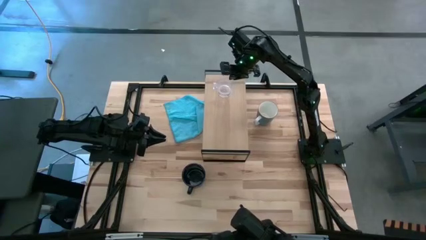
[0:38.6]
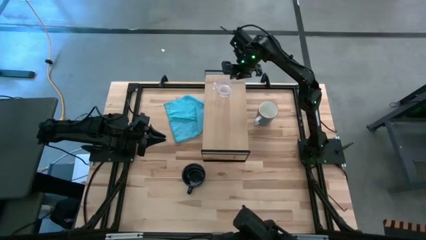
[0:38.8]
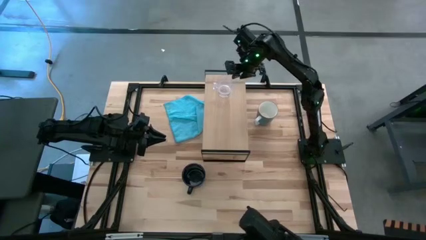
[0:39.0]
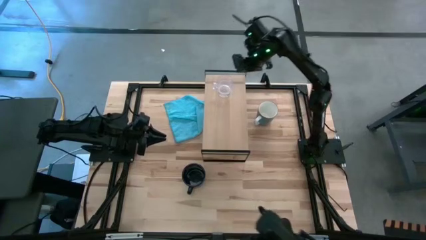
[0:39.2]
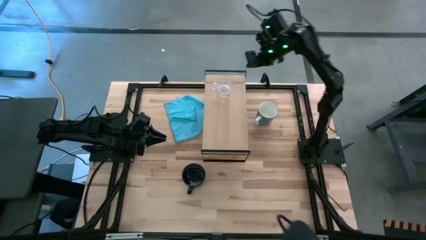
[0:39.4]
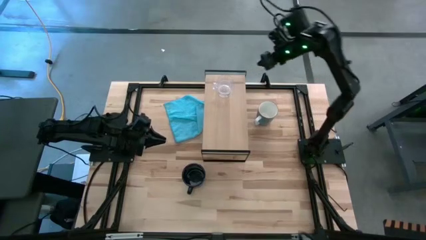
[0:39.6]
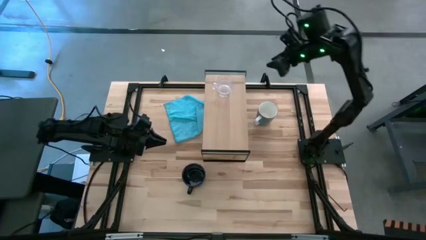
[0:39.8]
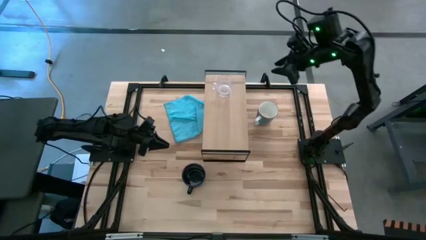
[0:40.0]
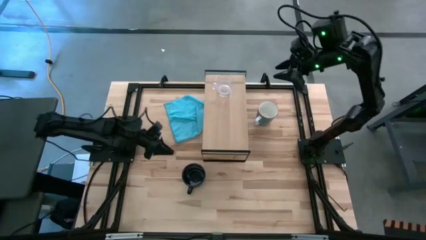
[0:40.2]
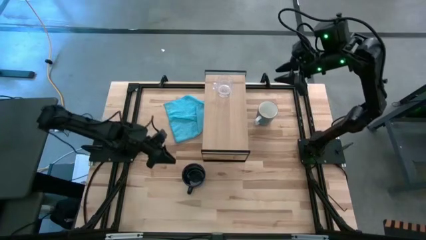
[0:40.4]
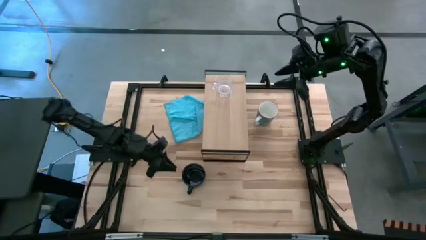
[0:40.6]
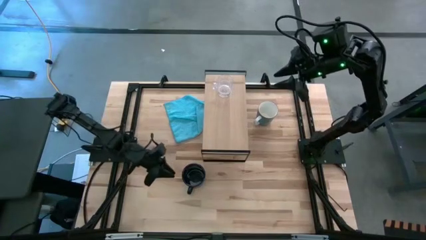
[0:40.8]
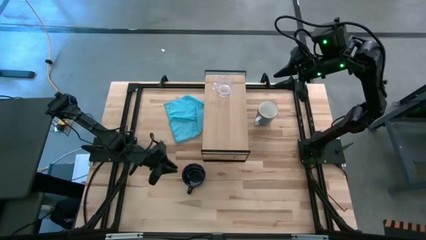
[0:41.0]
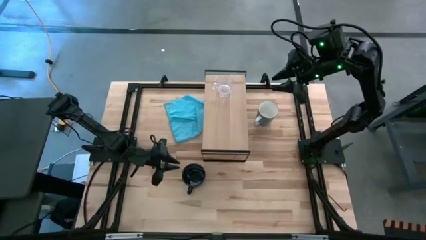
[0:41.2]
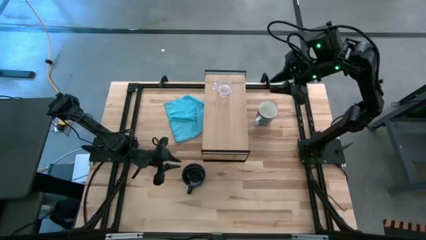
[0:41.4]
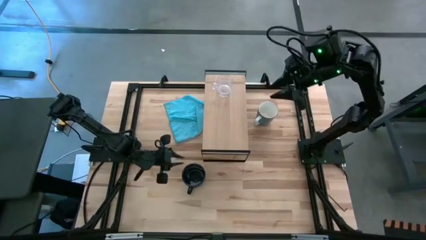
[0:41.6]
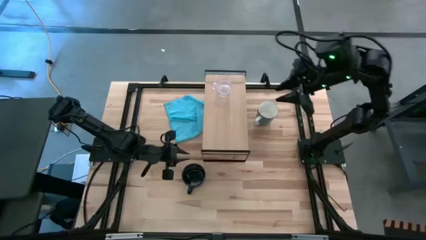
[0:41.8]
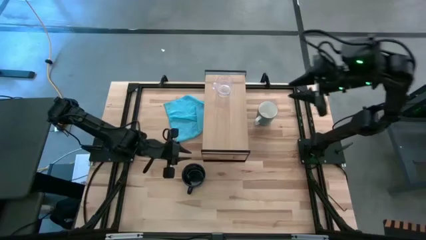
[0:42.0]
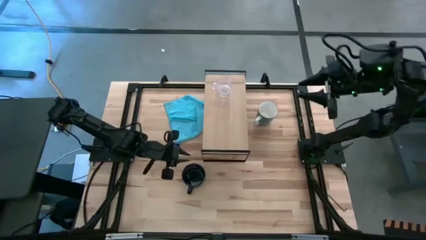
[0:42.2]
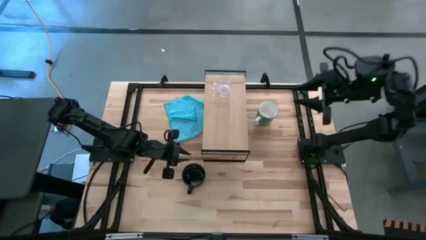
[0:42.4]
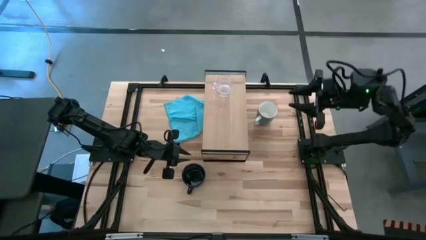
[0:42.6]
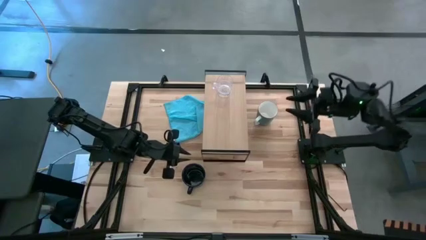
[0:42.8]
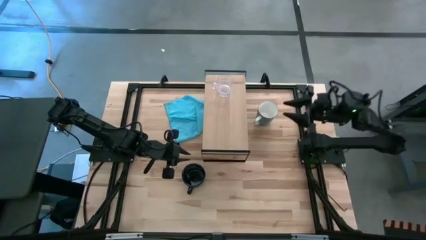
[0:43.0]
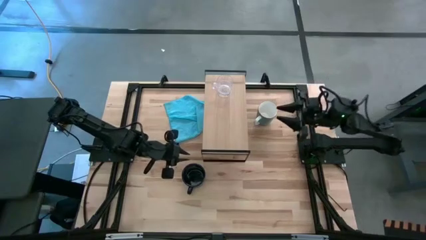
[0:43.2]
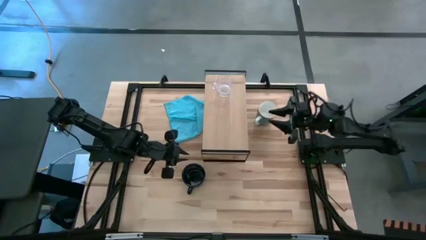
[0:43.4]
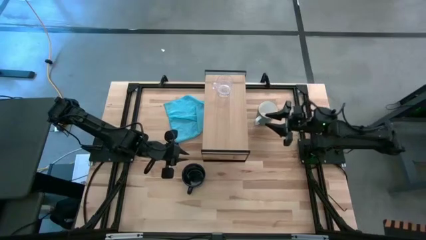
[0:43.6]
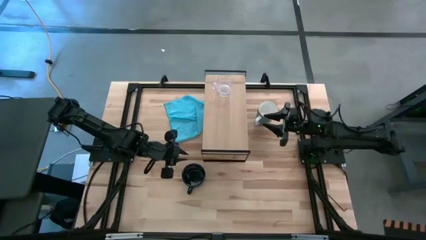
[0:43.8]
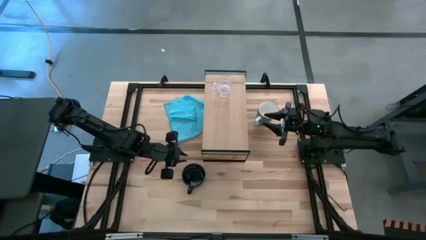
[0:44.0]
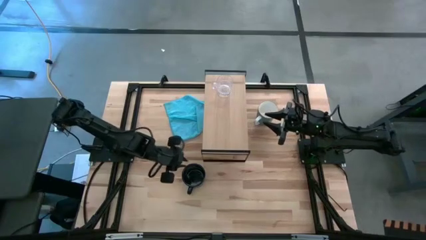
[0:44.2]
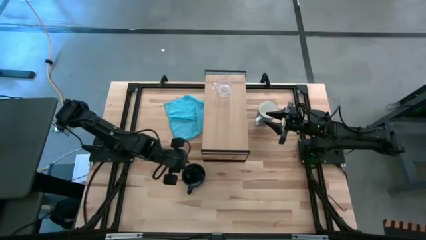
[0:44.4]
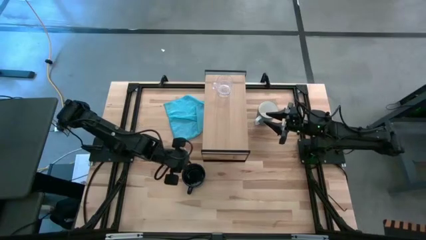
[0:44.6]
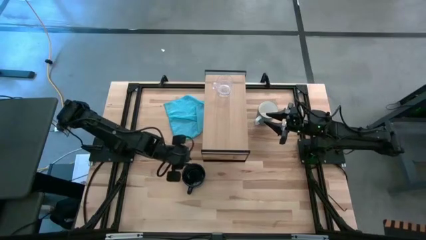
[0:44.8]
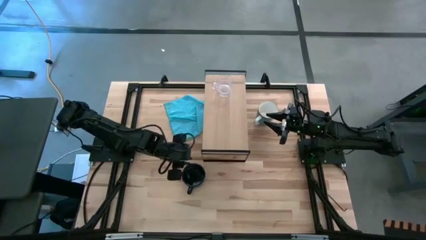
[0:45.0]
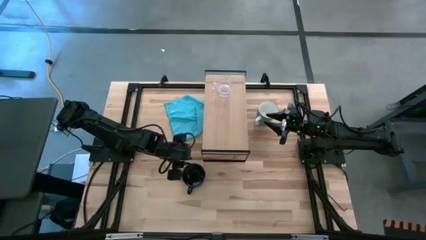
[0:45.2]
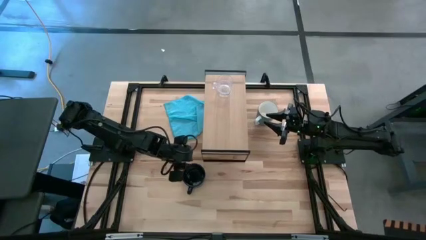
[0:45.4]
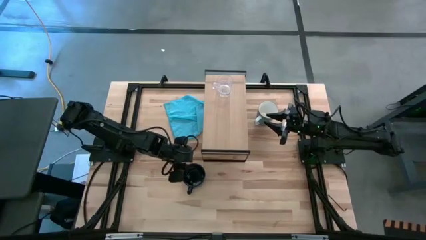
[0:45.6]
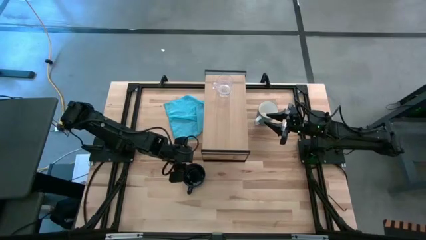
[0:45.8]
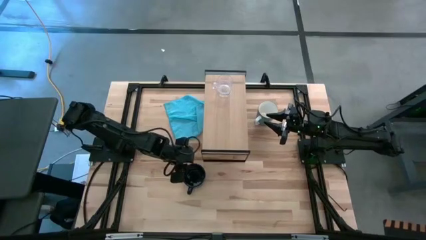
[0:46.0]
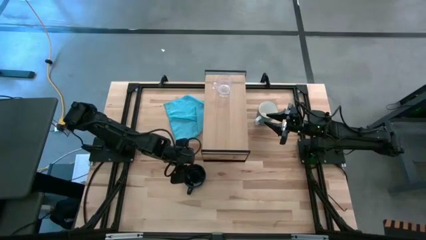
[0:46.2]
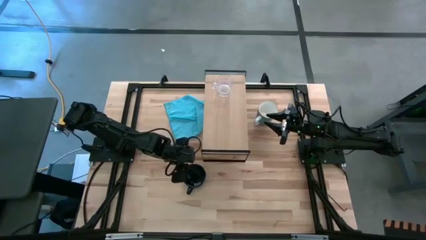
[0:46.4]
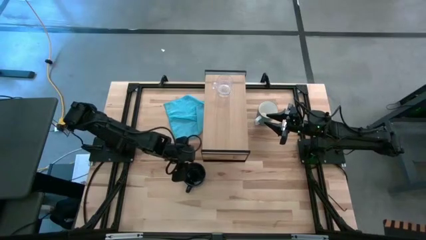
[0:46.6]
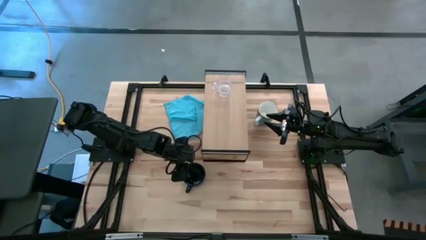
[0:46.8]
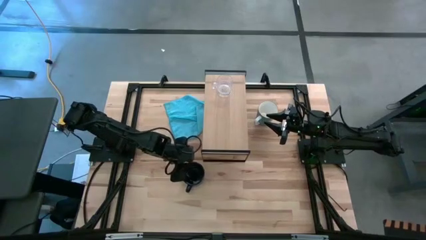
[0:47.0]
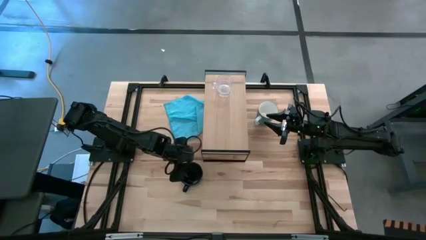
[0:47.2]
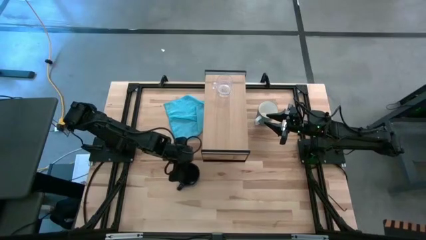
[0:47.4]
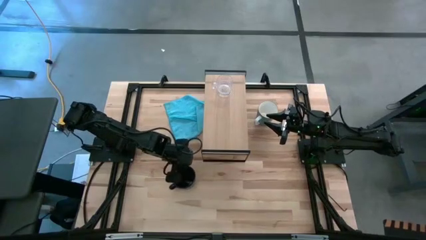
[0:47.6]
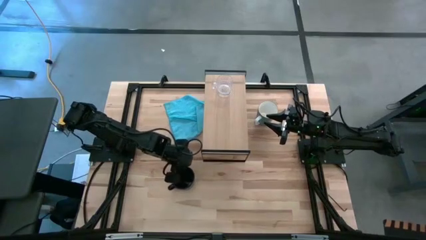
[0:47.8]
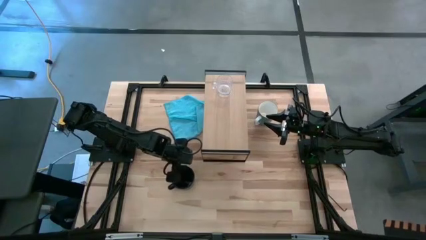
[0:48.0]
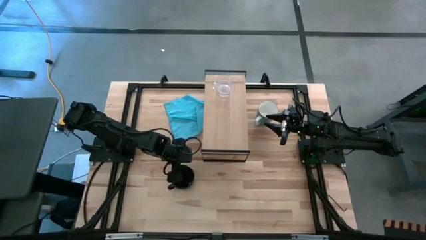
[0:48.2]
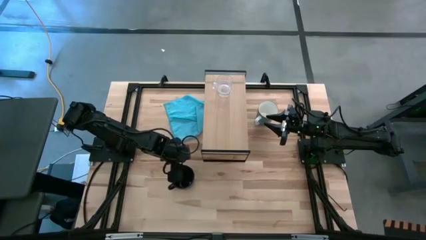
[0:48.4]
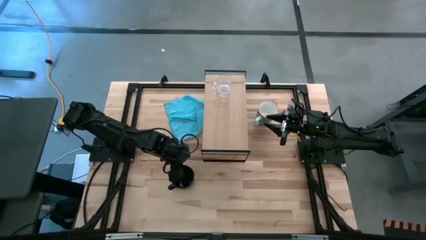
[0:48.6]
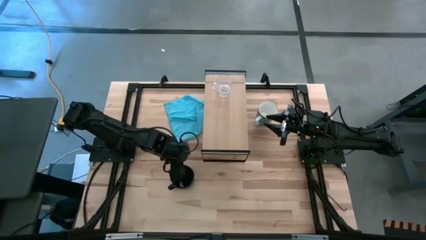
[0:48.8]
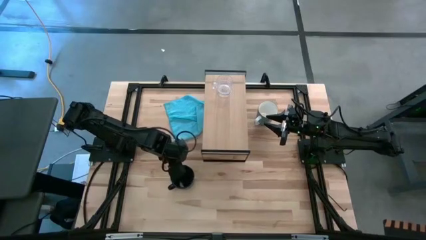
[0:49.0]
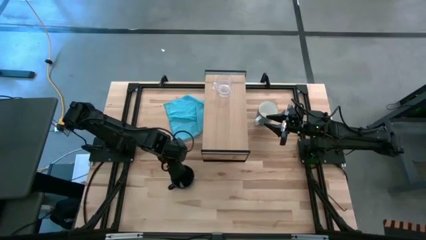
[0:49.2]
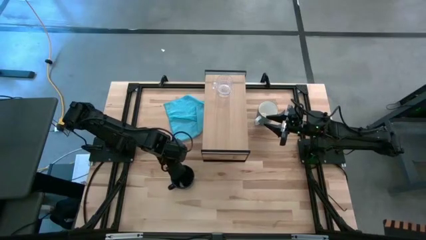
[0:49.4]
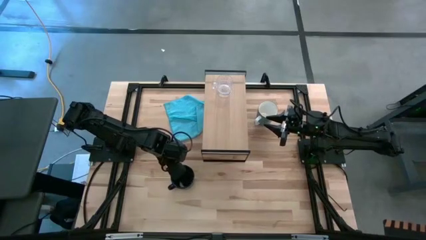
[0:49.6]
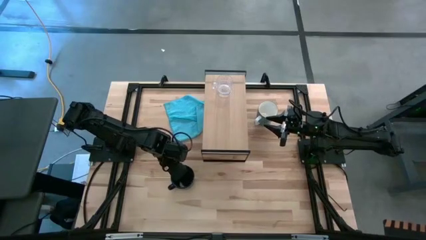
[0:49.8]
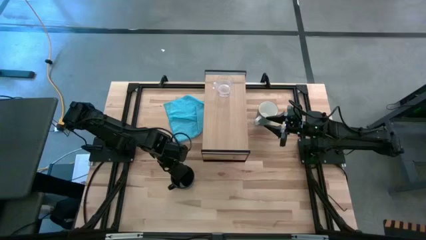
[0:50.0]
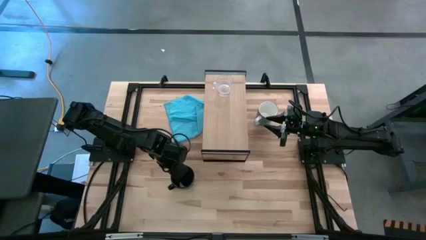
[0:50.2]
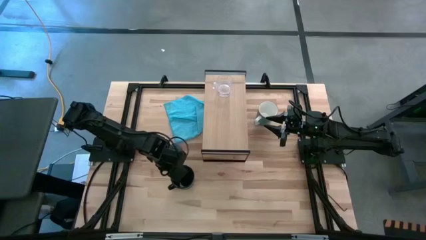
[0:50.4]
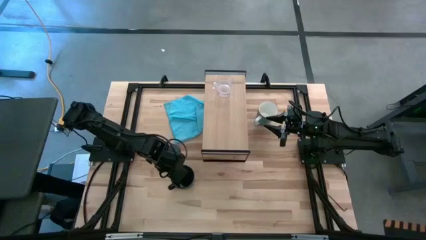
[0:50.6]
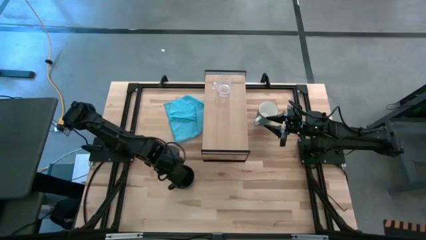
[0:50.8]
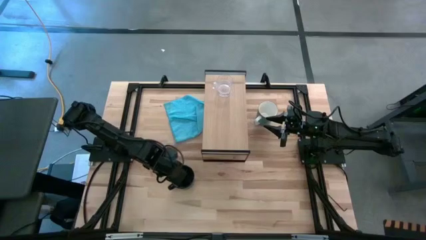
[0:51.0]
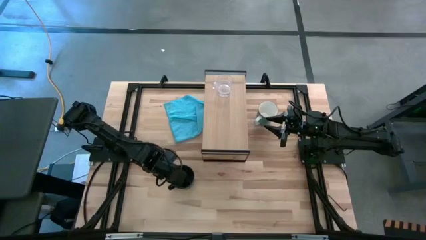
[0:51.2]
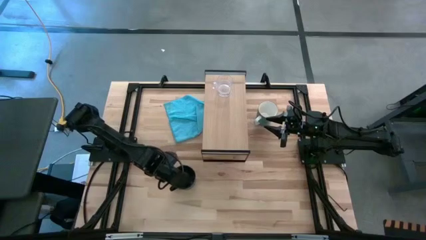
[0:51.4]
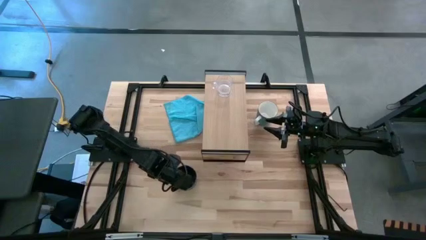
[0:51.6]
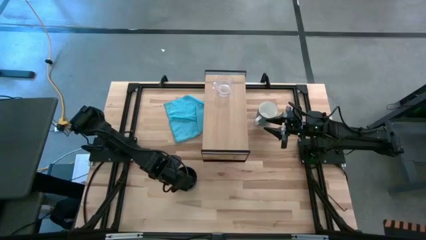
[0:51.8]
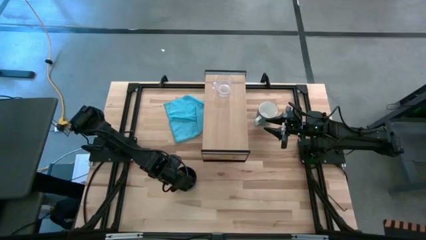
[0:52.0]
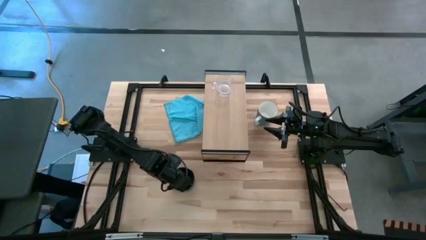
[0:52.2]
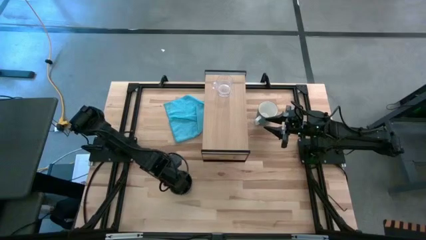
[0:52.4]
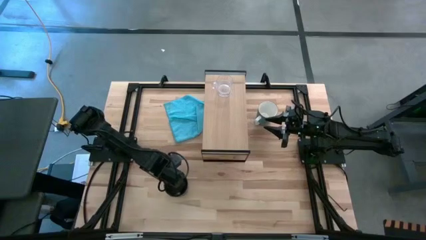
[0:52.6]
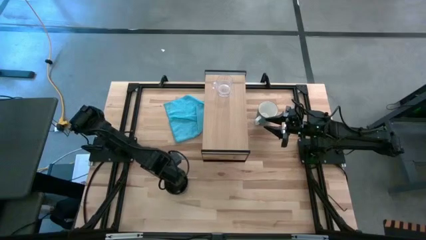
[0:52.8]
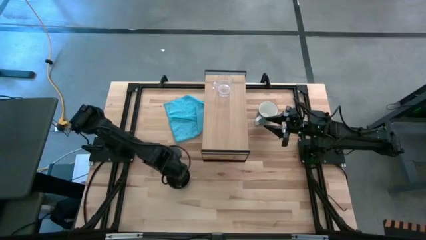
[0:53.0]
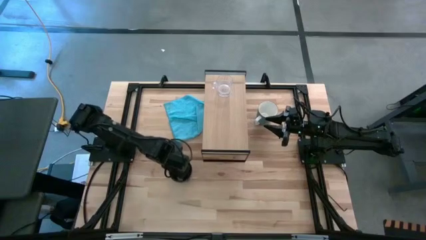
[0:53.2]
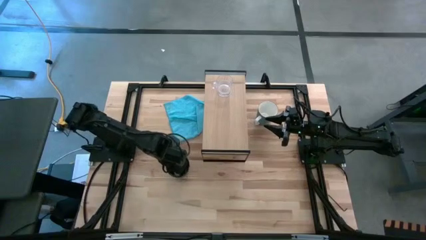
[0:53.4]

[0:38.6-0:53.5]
Task: Stack small to large cups/mugs on shelf
Put the dark blue mug on the shelf
